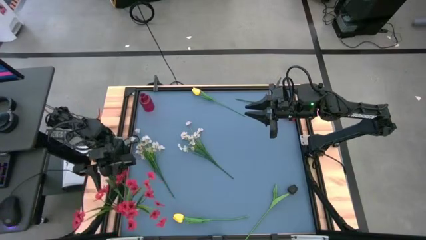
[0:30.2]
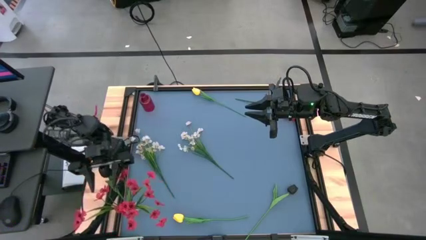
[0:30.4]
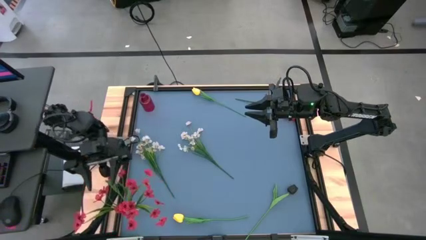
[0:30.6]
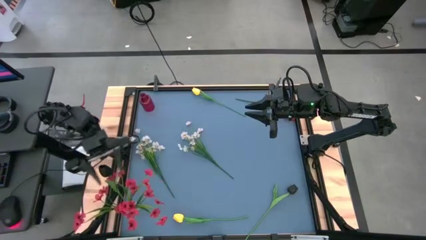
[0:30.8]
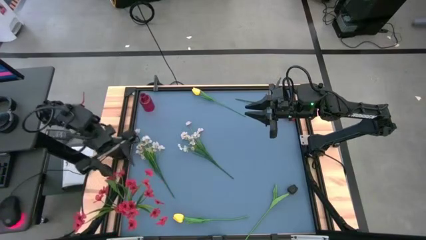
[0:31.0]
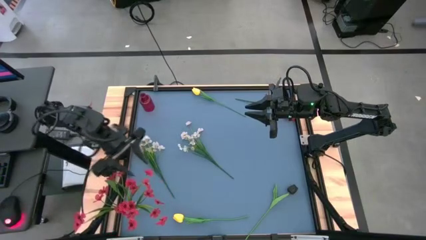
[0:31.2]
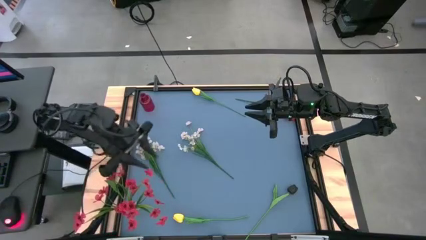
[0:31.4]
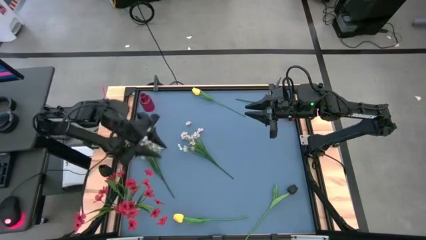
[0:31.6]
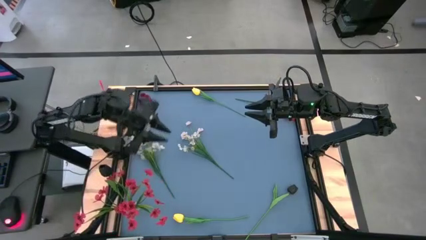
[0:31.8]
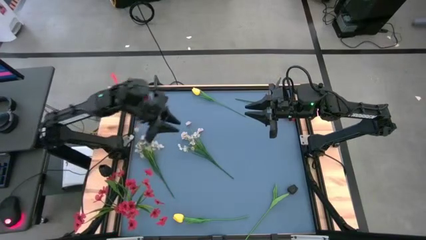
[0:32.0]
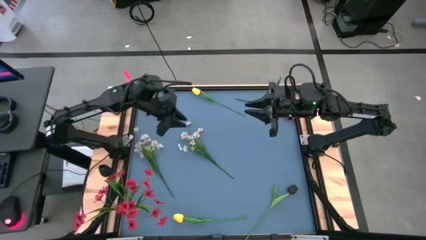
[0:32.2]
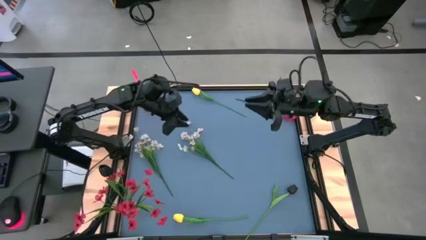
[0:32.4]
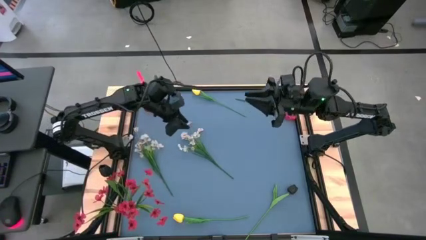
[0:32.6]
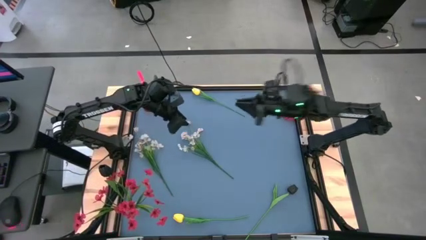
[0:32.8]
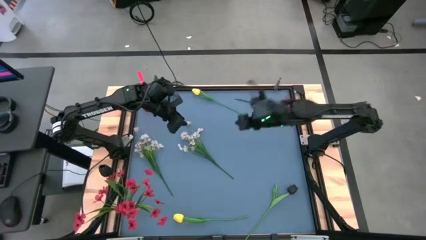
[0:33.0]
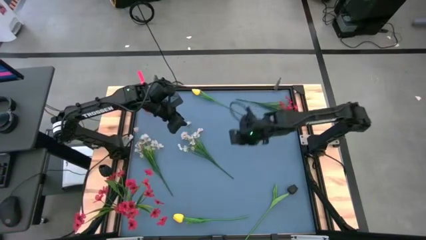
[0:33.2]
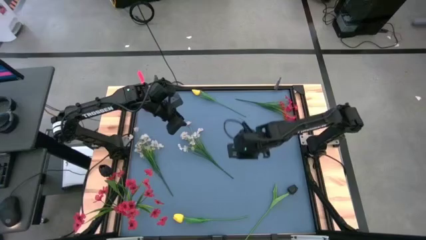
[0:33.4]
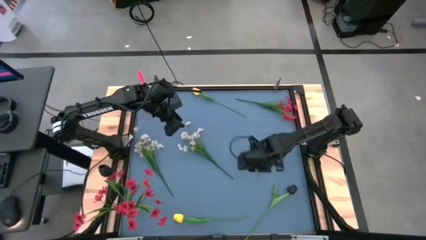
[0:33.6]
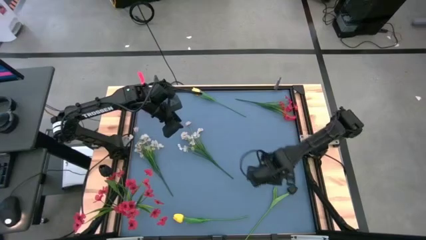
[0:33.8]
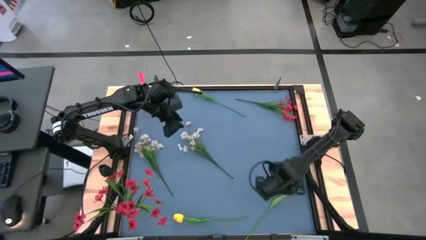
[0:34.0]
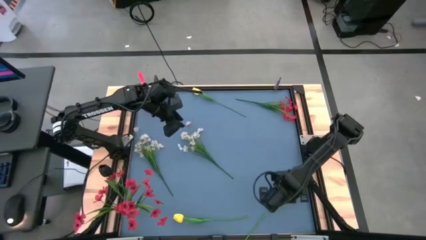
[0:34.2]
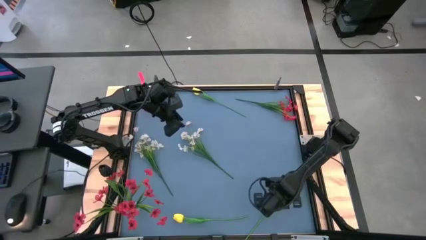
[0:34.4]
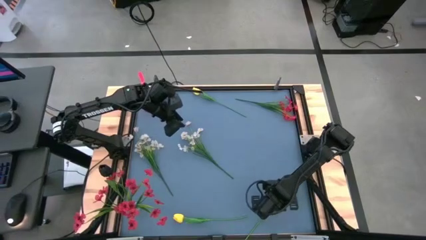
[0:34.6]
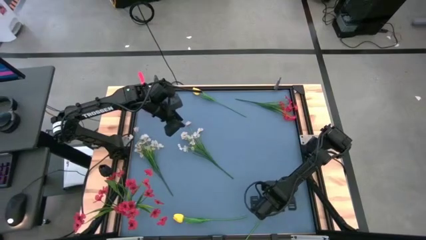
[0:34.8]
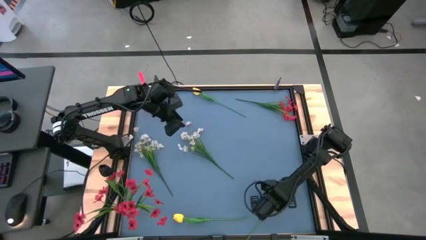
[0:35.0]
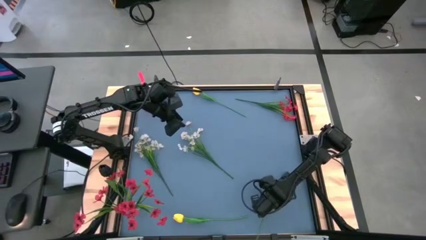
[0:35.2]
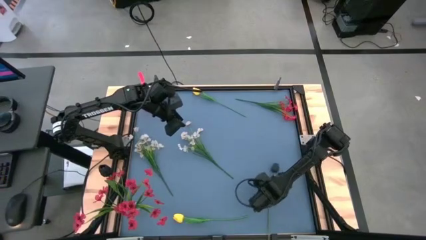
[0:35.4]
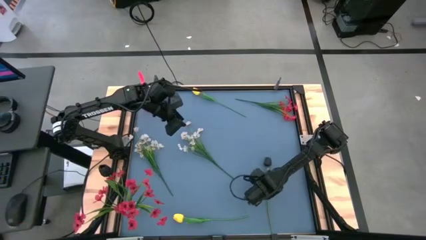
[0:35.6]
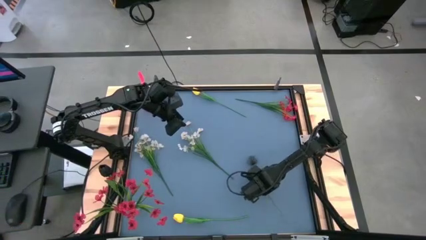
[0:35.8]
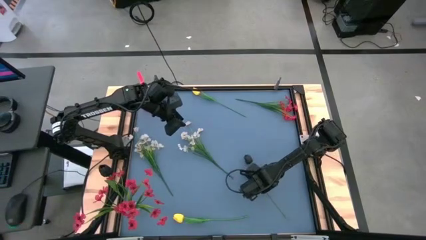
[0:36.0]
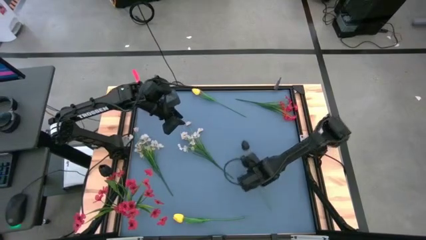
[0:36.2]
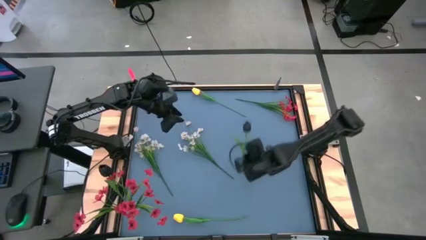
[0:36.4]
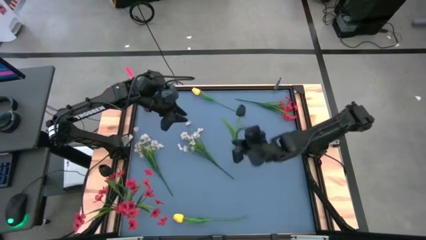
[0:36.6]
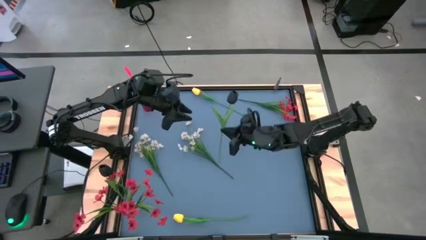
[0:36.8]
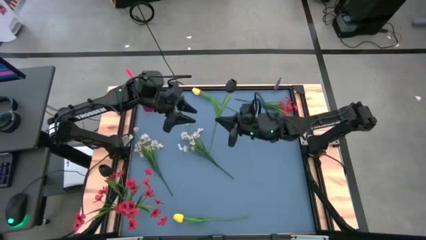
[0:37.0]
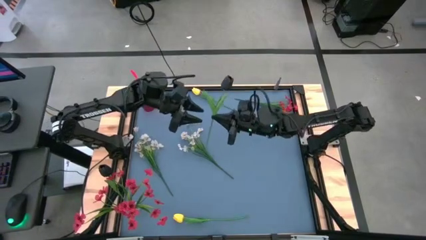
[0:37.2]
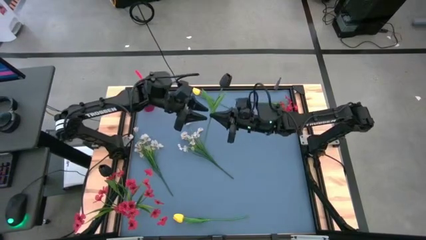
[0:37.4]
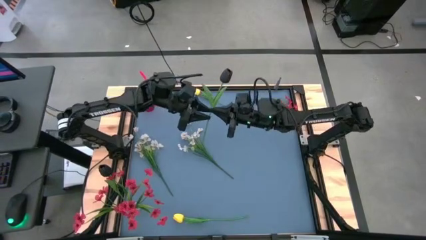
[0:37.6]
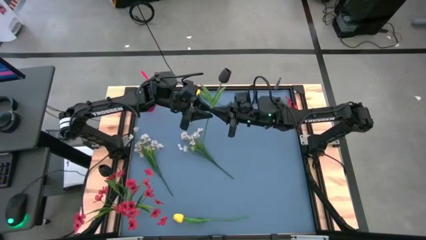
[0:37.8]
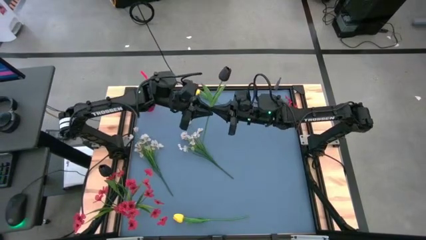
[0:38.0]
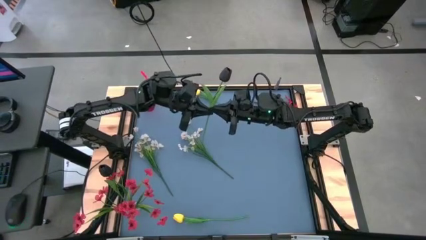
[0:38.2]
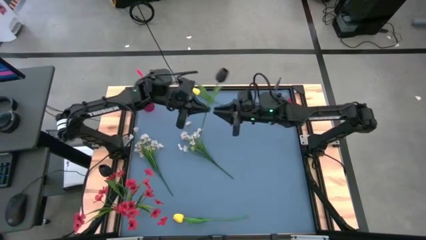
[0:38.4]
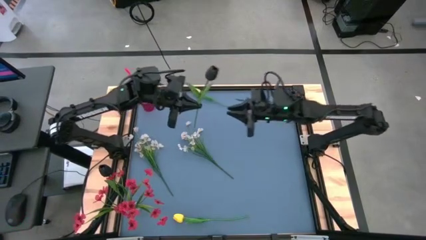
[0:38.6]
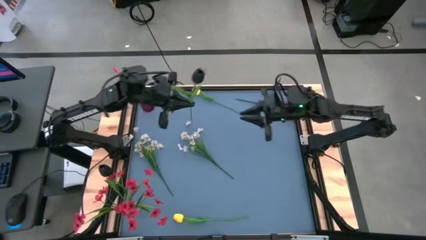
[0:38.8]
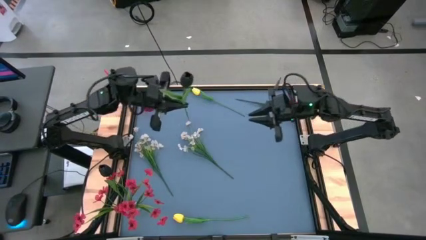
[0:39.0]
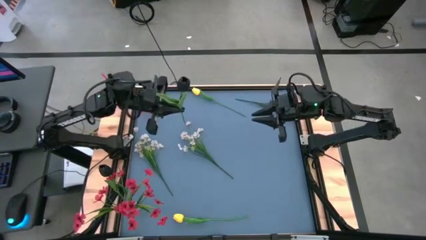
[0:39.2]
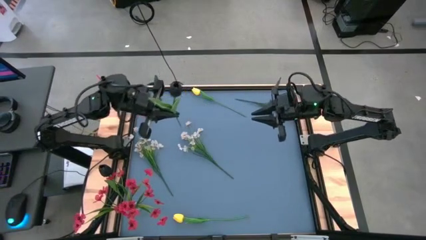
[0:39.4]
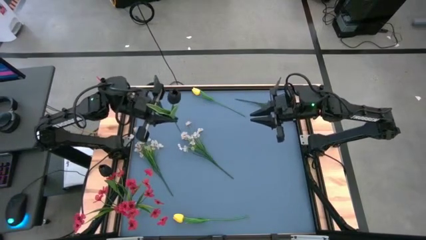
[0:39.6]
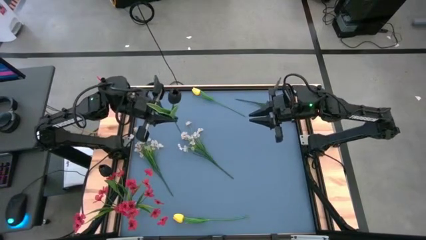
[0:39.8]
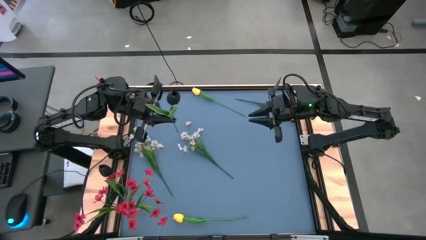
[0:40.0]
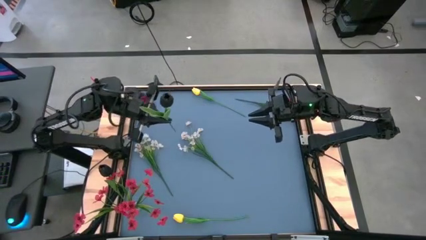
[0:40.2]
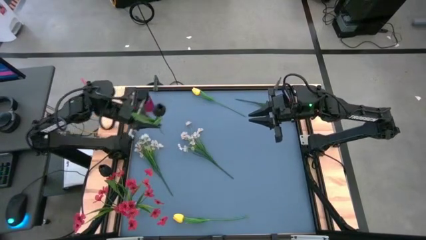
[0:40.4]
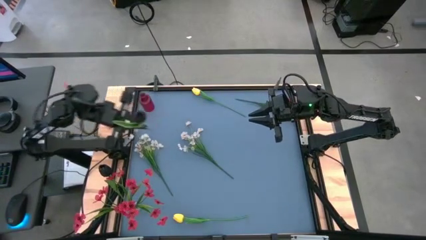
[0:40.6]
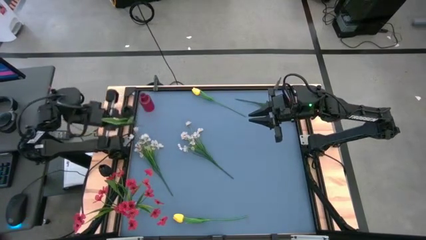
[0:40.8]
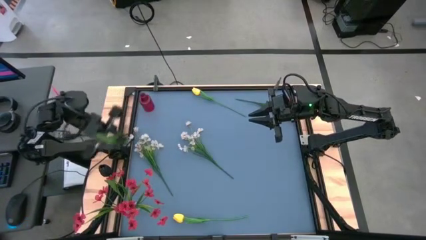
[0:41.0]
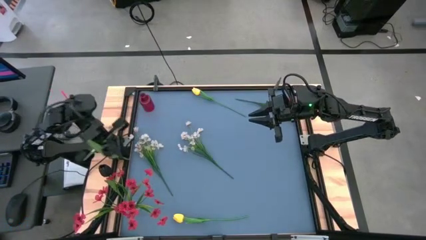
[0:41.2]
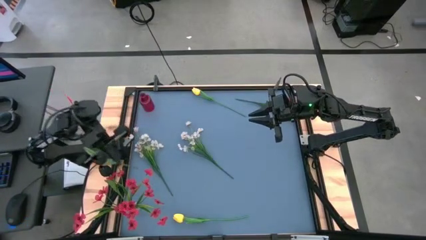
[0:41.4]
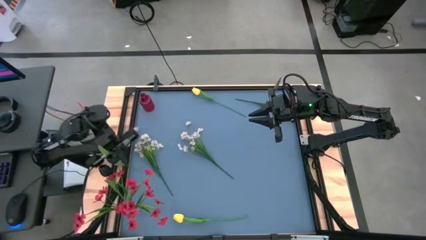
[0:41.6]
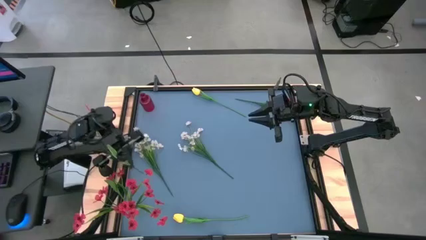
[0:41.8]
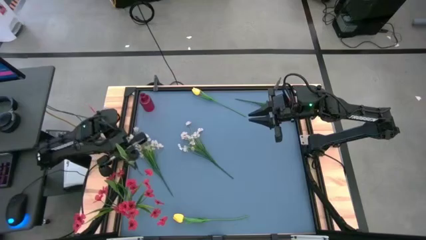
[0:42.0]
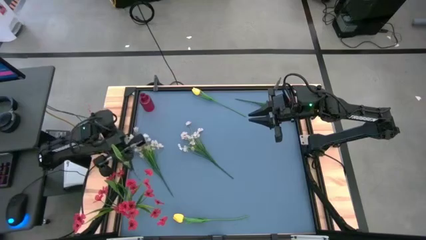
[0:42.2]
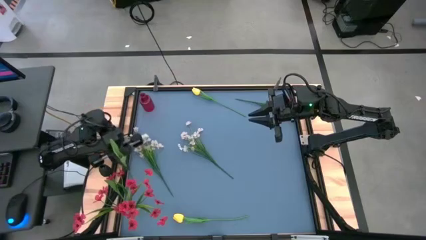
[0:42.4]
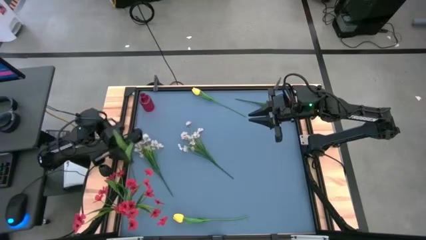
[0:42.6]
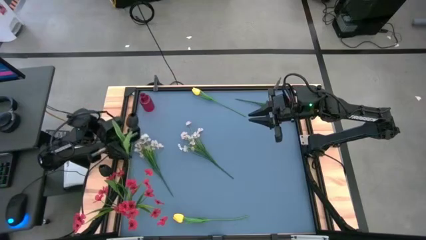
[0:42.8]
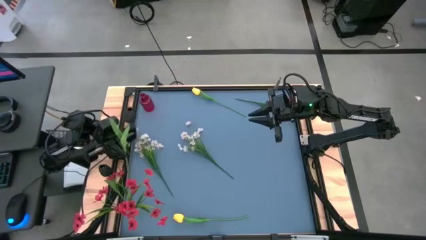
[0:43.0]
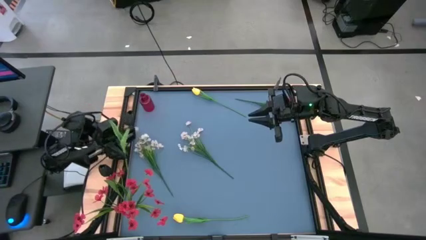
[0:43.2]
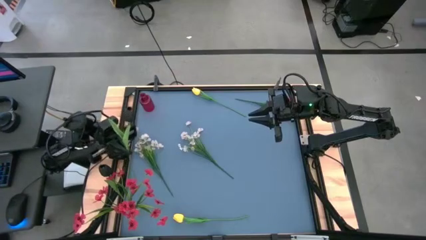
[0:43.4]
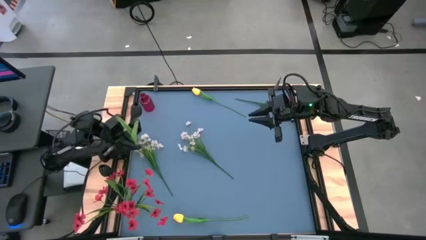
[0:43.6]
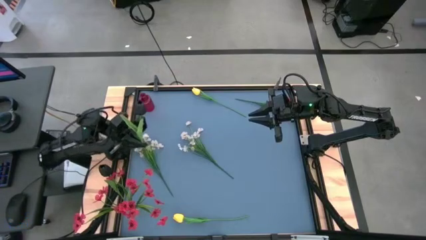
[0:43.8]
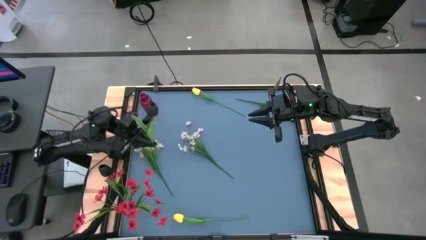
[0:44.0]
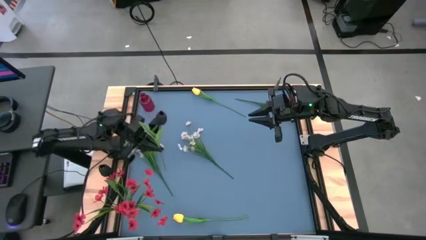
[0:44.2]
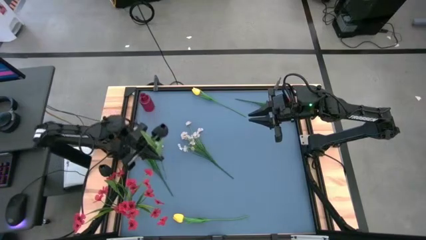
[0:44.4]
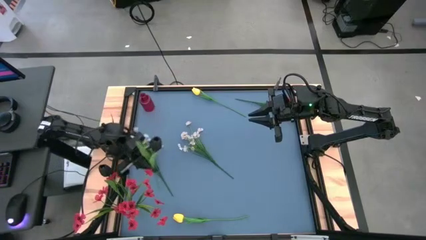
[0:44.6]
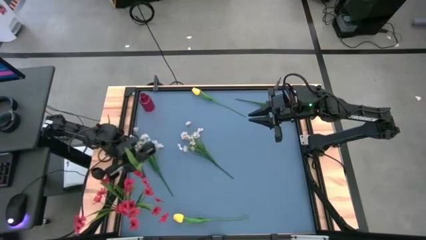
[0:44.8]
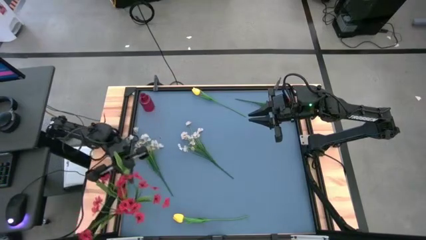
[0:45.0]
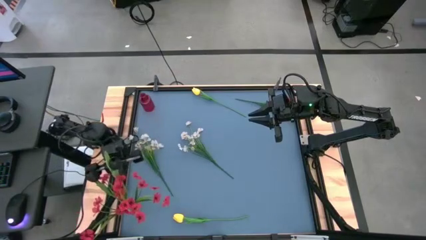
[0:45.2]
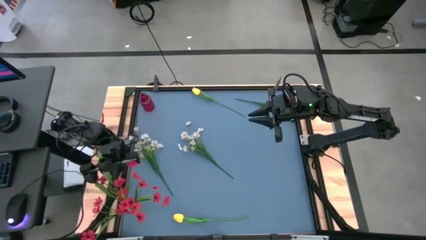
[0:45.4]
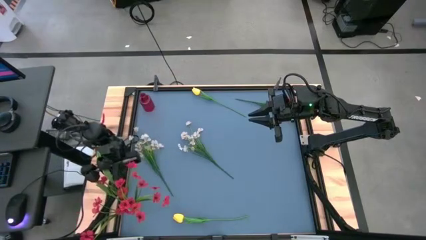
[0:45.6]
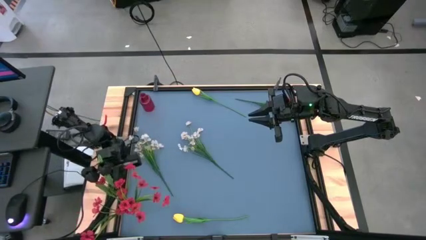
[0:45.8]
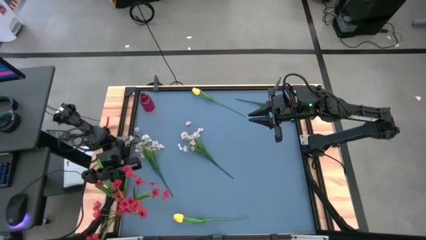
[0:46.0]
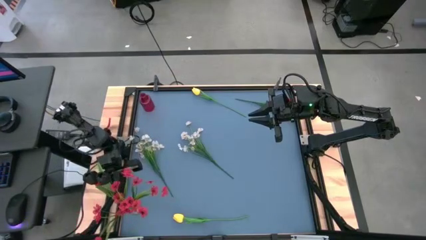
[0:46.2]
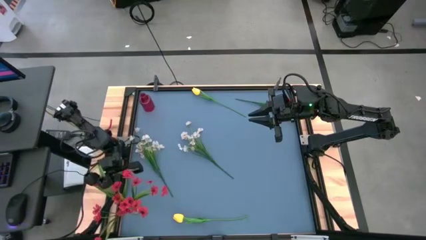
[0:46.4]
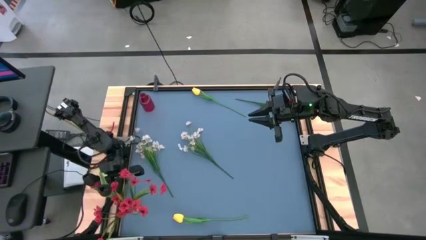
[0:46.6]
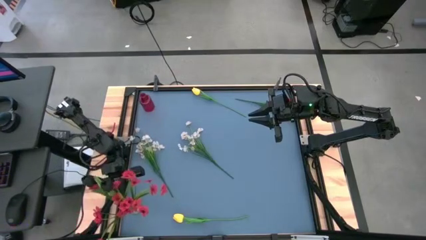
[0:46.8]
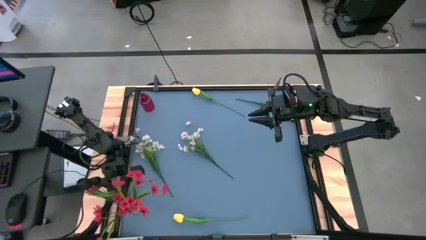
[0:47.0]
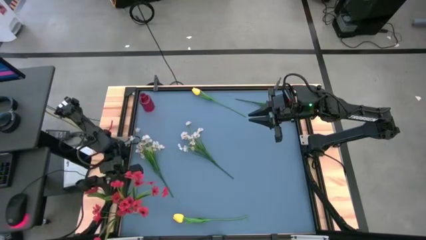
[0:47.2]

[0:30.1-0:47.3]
Task: Sort flowers into vase by color
Put the black flower into the transparent vase
